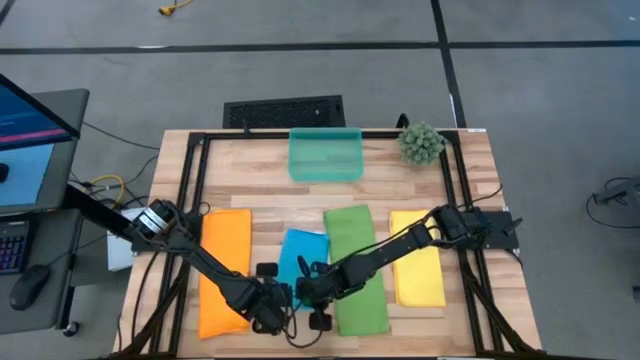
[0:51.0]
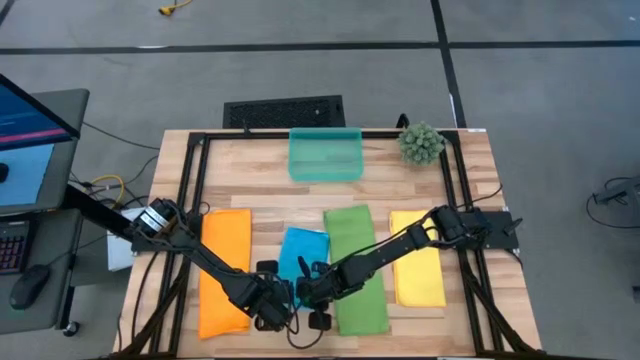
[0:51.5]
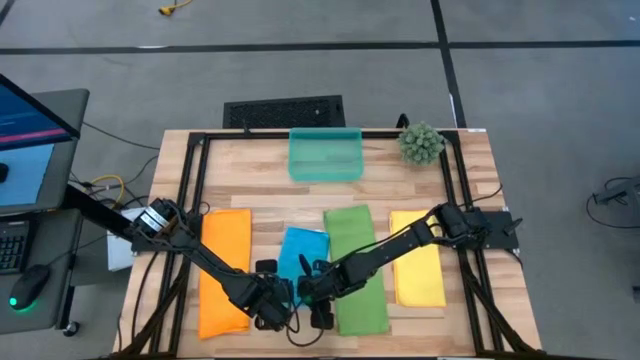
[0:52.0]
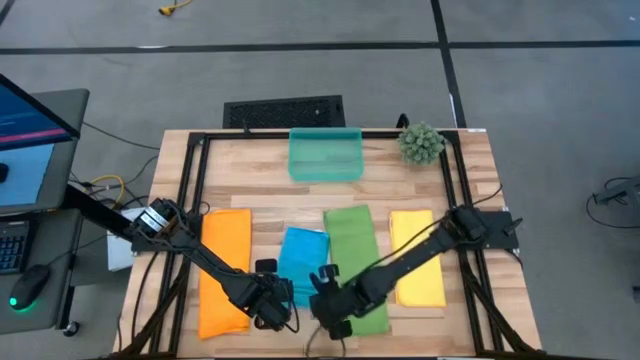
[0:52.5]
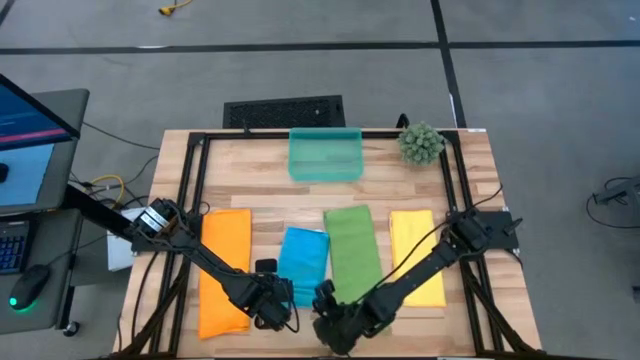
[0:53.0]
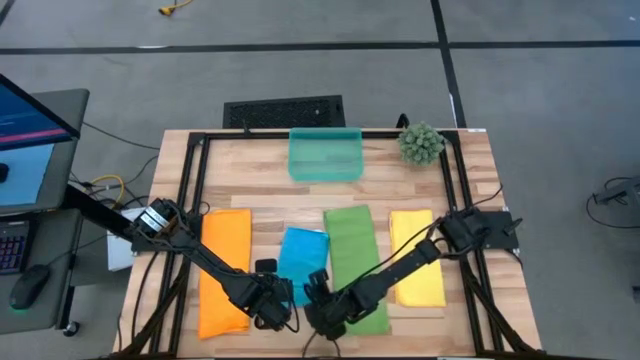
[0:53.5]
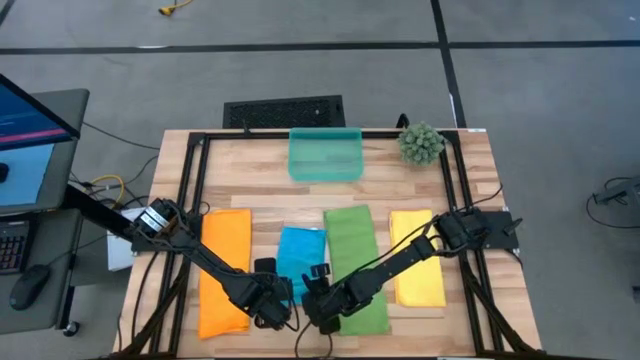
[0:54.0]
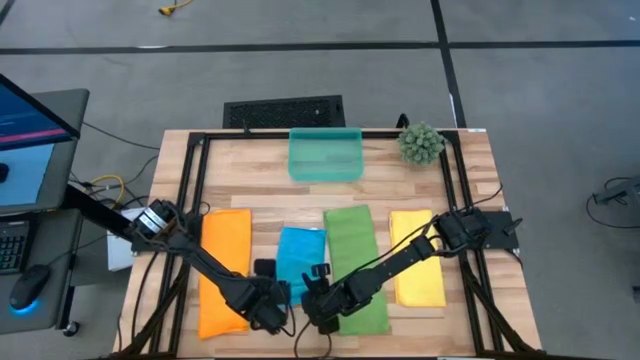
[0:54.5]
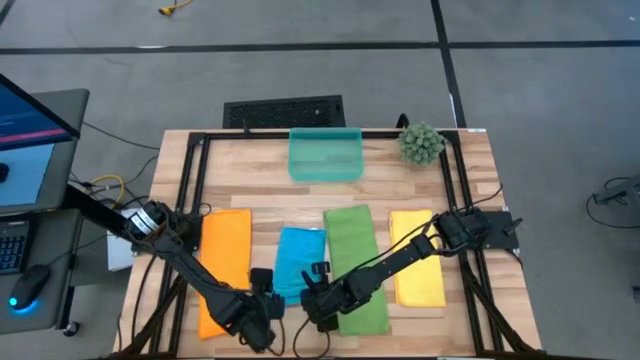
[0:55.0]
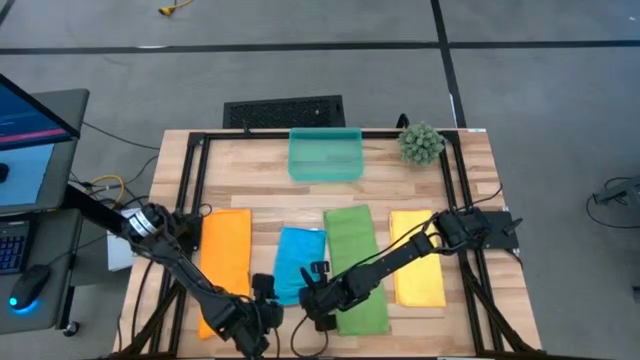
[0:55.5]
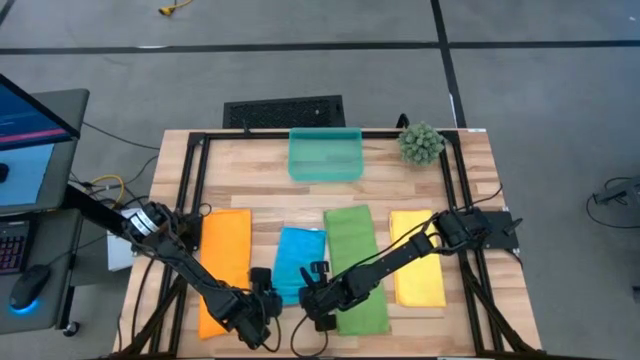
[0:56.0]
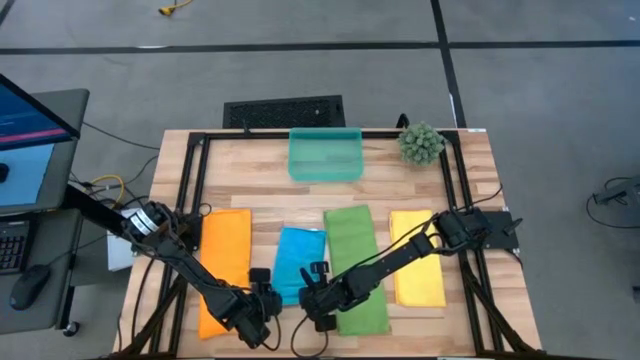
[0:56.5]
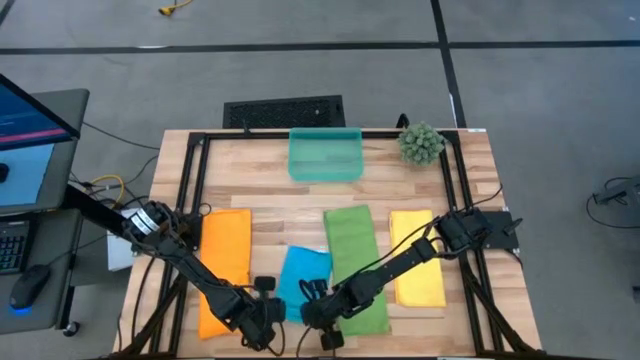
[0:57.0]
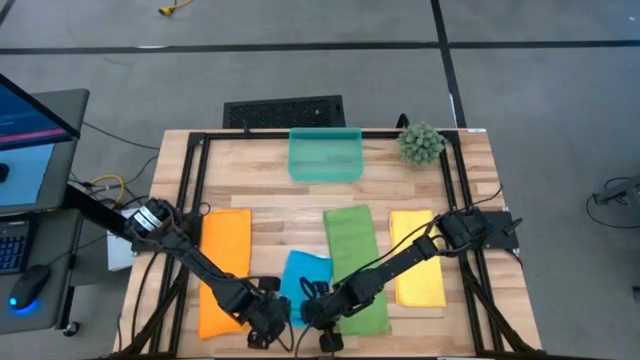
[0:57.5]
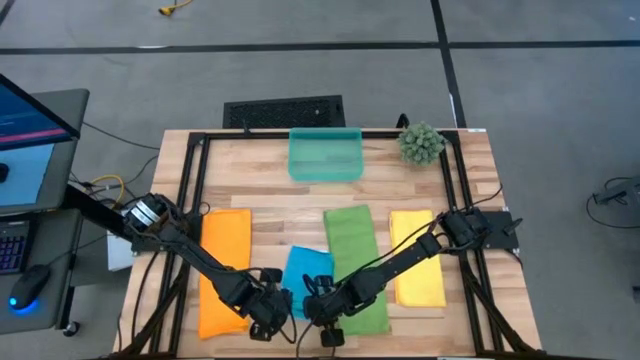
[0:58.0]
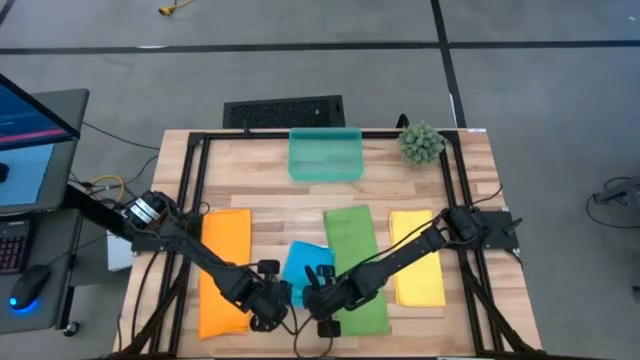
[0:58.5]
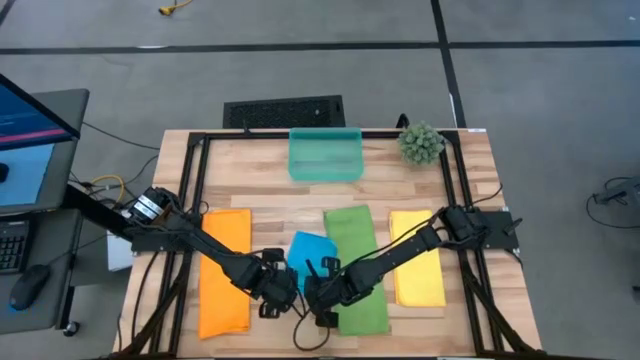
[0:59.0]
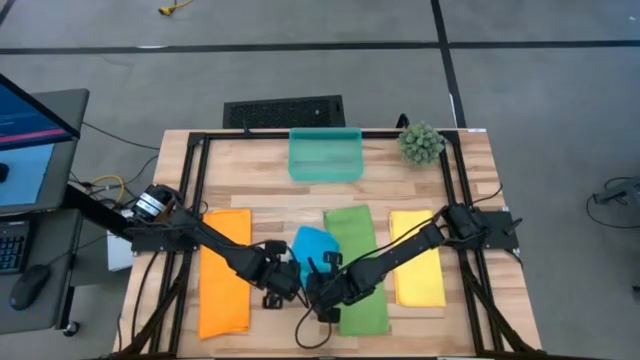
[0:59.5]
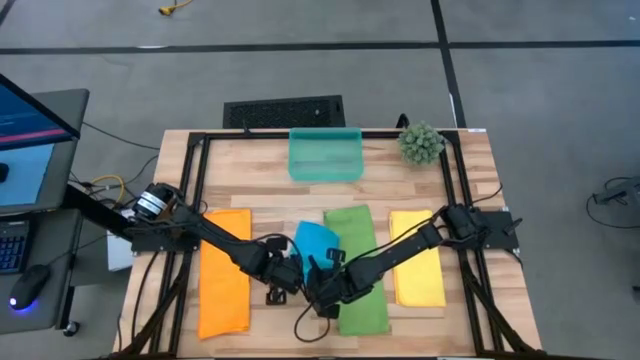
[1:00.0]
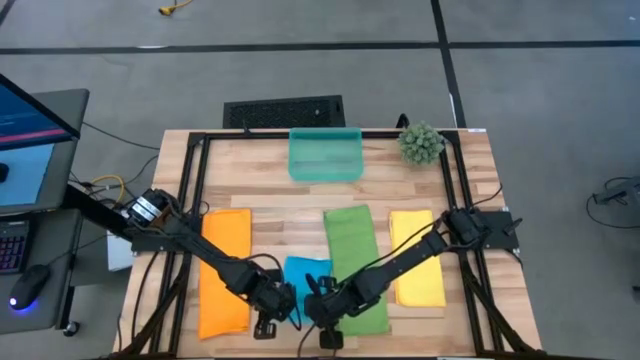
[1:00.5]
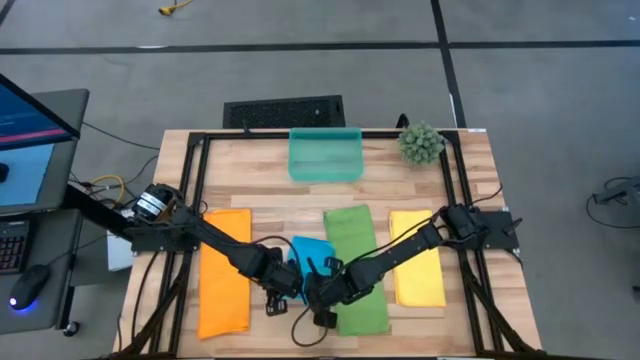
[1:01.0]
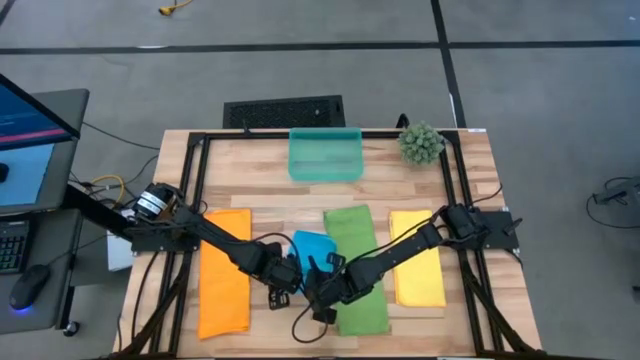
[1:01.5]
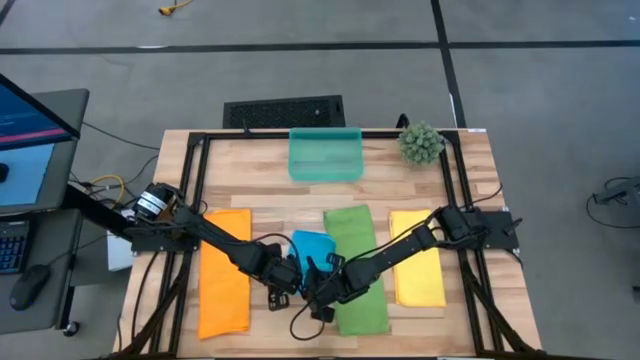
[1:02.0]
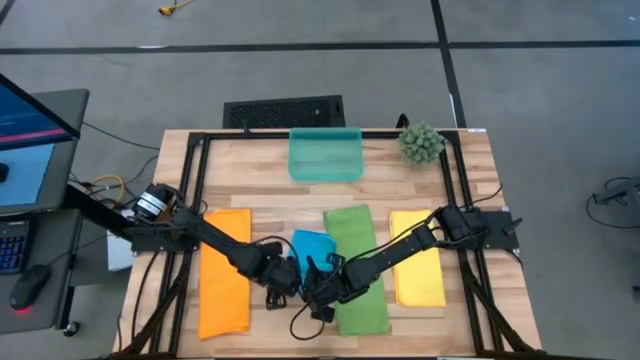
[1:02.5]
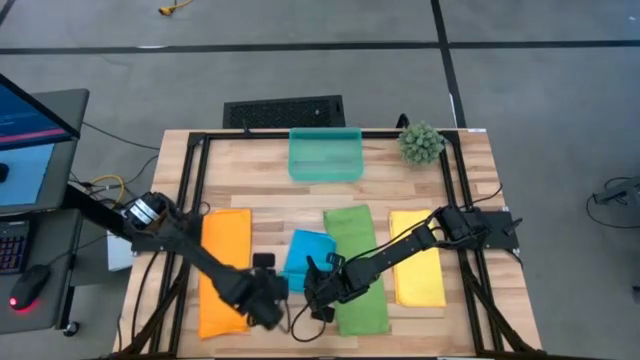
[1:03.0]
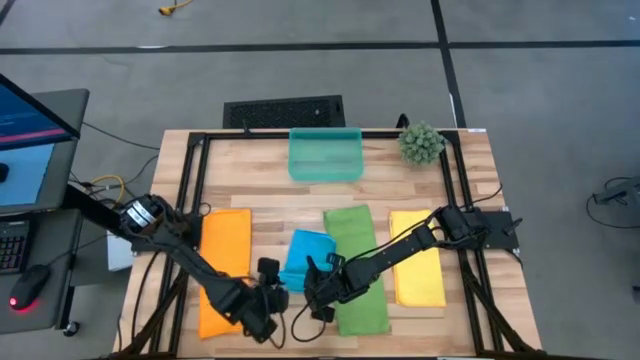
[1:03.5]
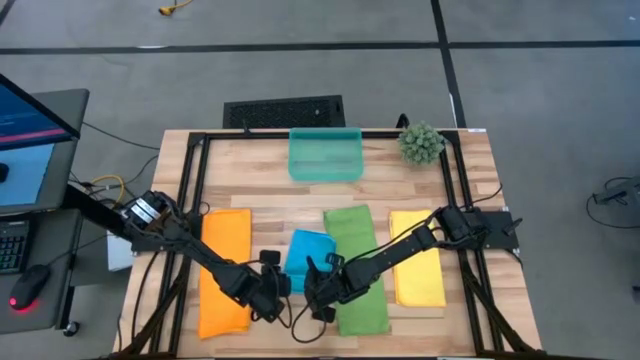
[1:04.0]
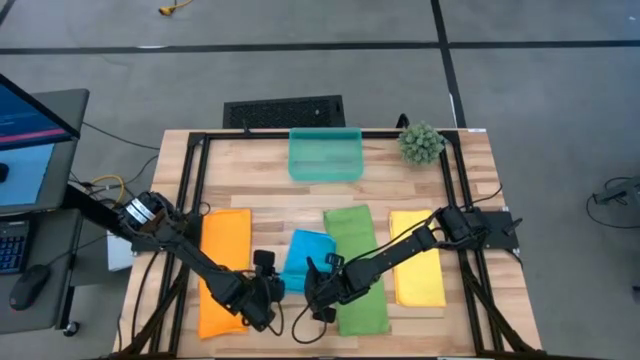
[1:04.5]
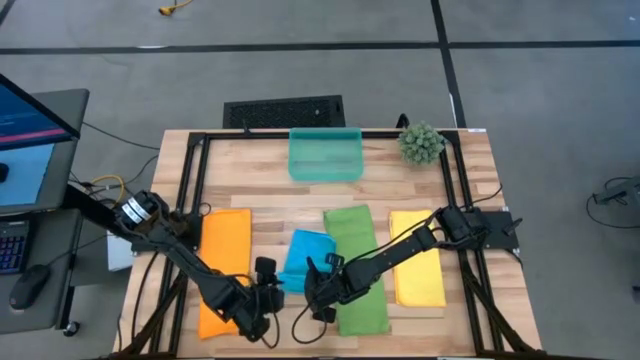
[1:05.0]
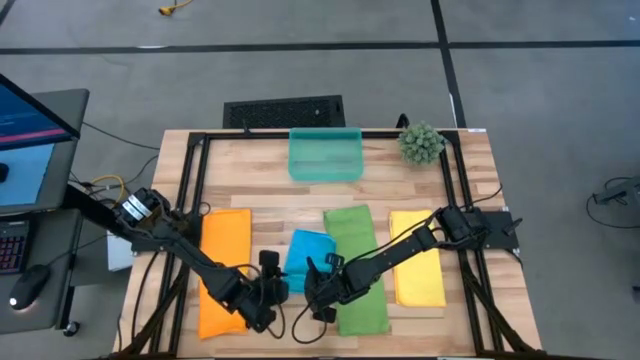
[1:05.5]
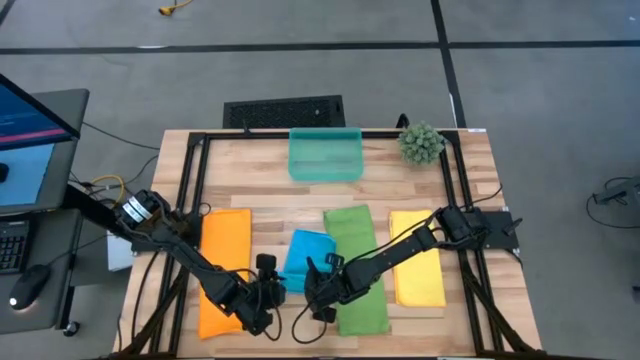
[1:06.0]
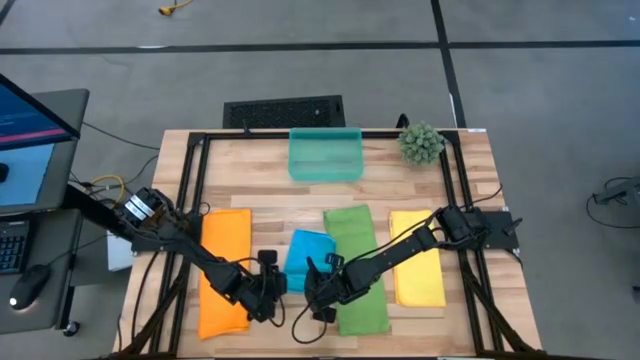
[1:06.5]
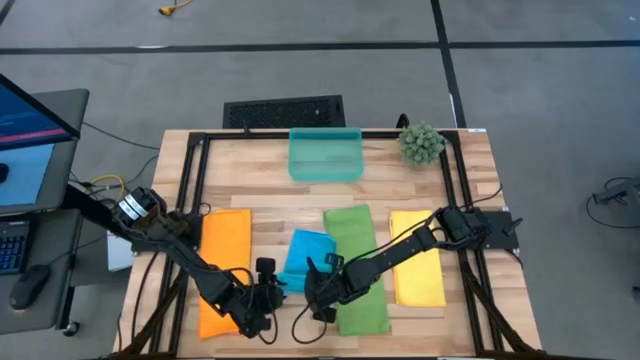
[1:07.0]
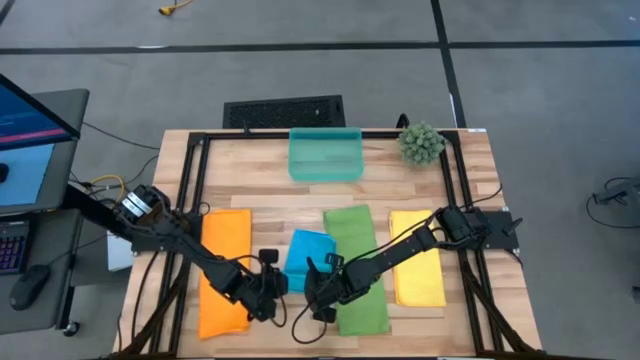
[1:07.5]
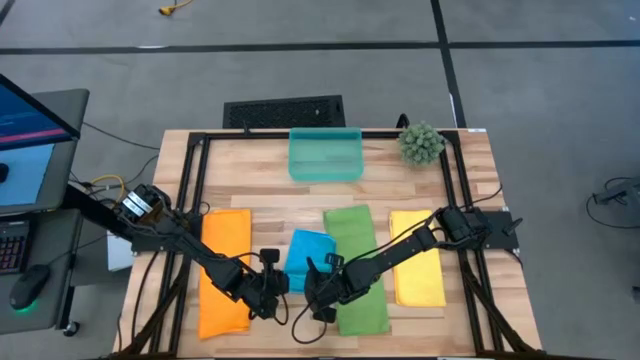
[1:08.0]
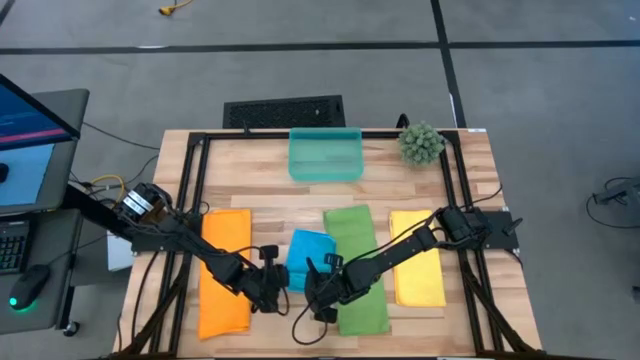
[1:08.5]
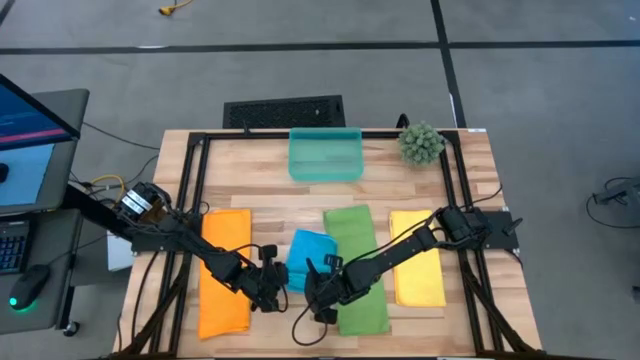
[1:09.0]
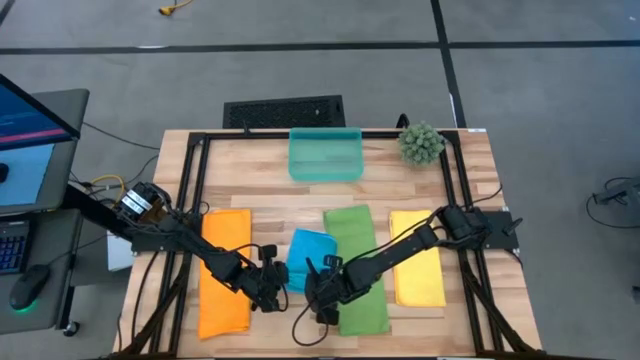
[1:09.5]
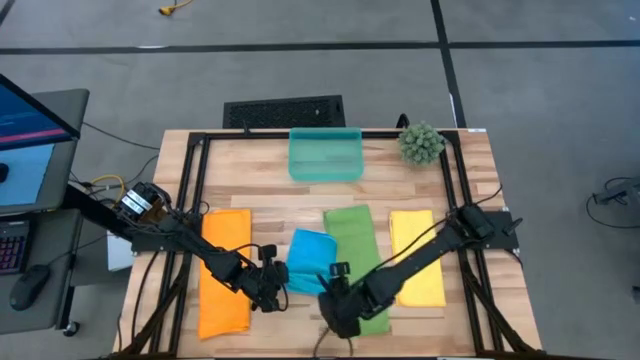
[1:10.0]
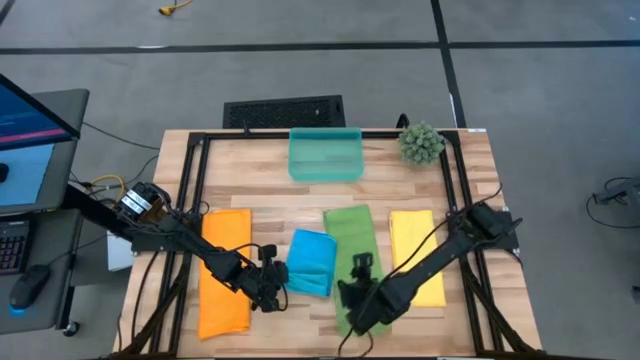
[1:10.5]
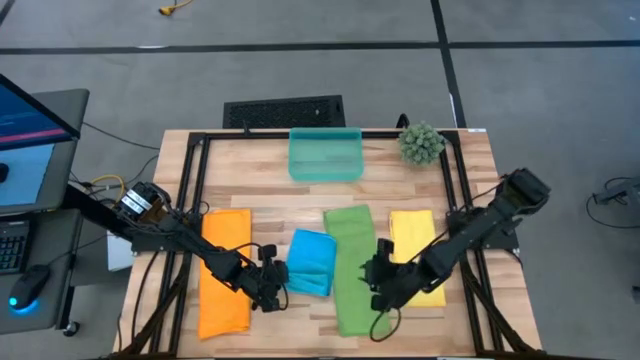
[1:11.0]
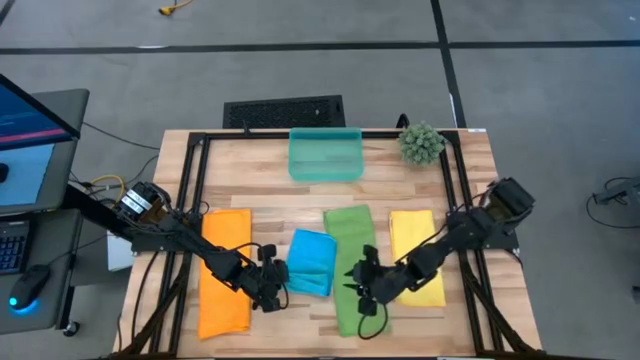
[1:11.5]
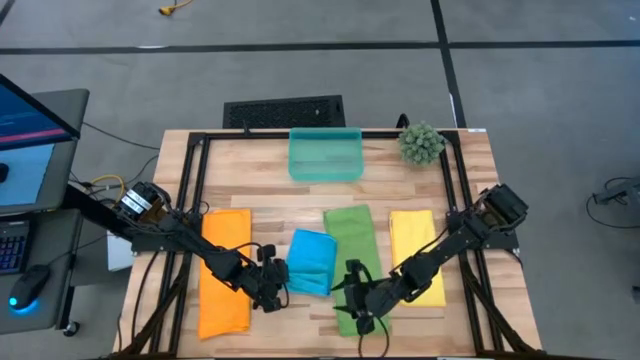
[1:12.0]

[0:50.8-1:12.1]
Task: Roll microfiber towels into tight, uniform cylinder then place into a basket
Roll the blue towel

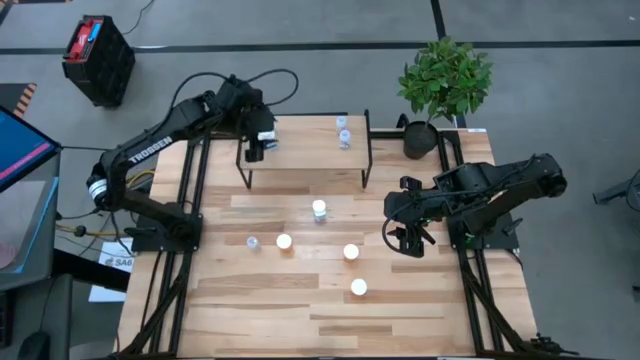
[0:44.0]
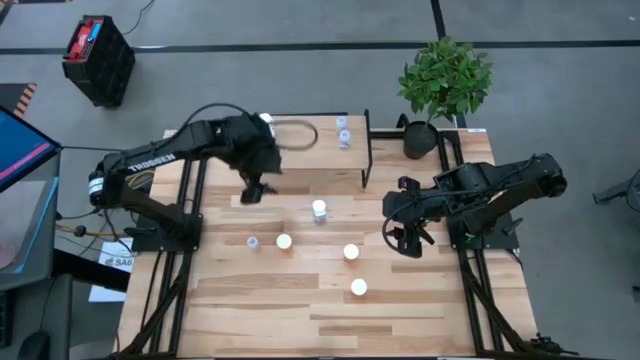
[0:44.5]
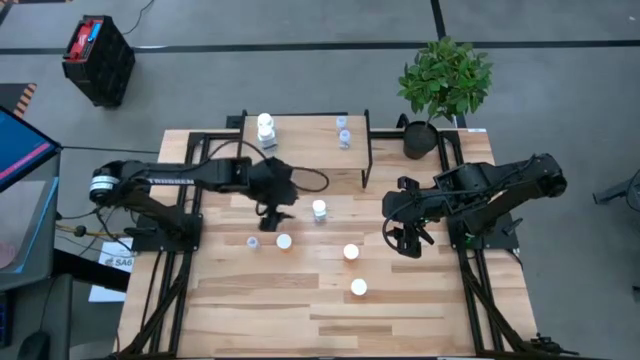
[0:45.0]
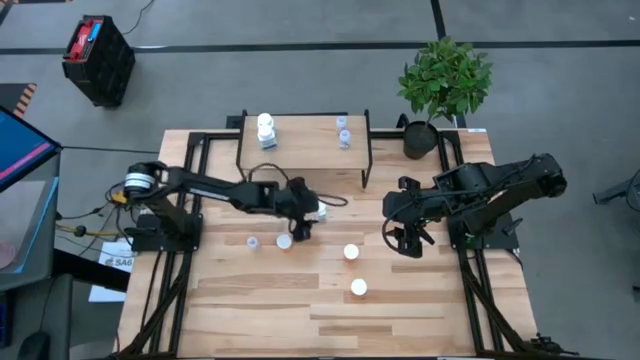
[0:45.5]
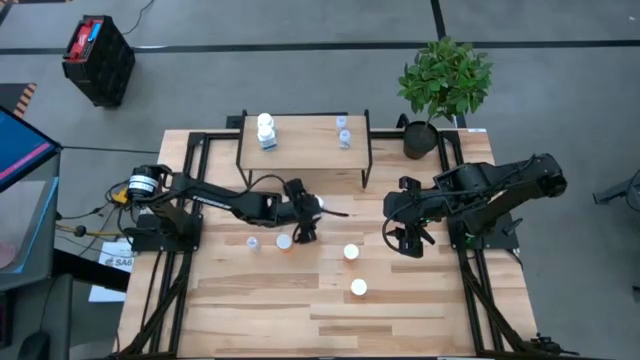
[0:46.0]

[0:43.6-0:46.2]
Task: Pick and place medicine bottles onto shelf by color
Put the white pill bottle on the shelf aligned with the other white pill bottles
